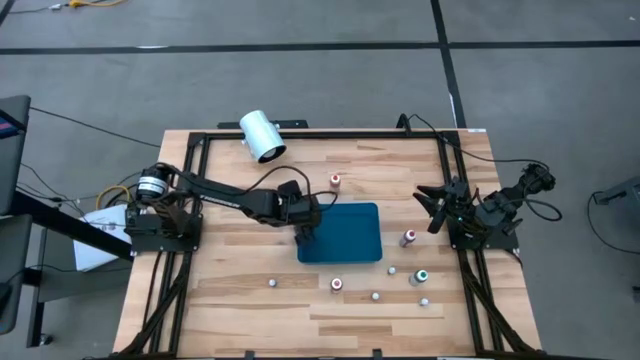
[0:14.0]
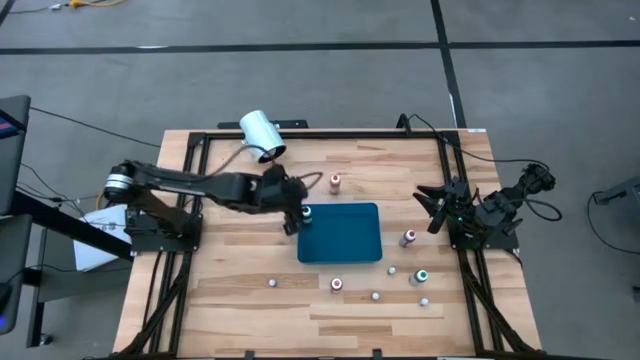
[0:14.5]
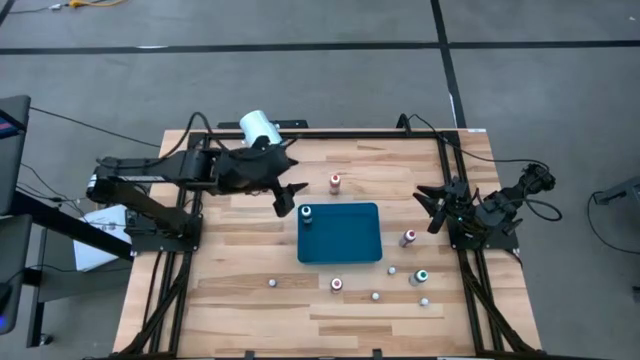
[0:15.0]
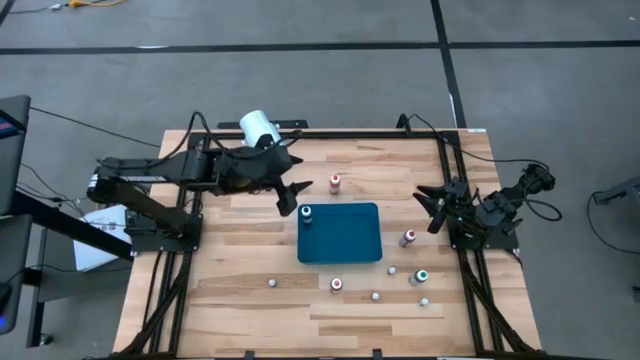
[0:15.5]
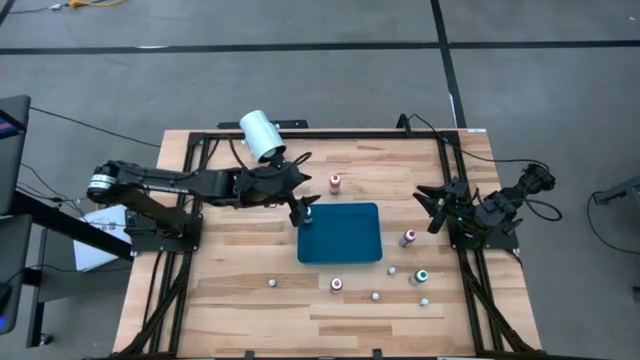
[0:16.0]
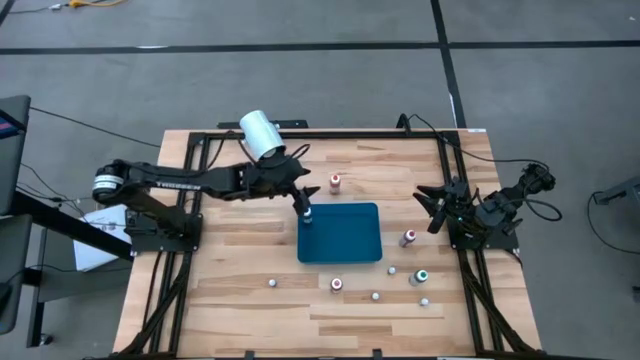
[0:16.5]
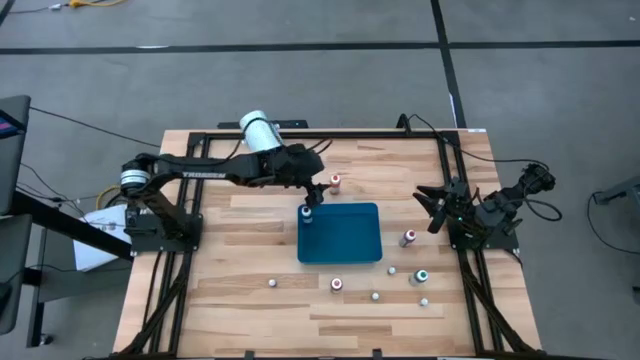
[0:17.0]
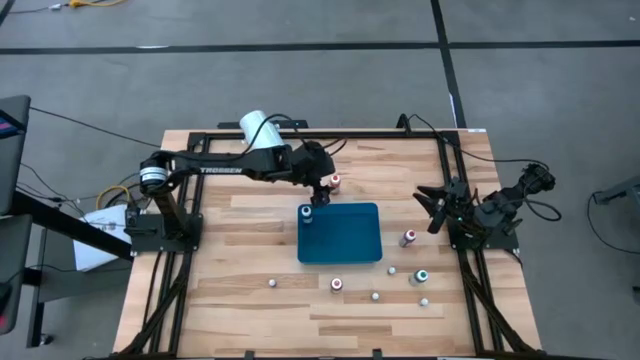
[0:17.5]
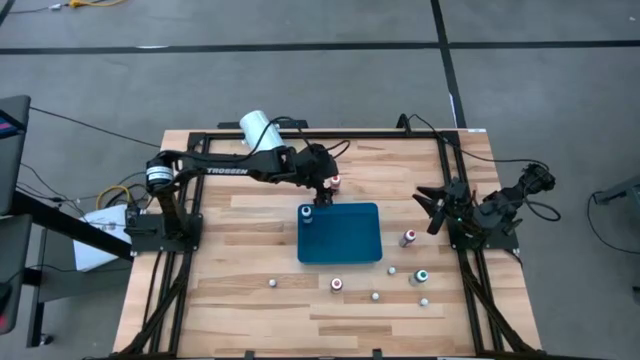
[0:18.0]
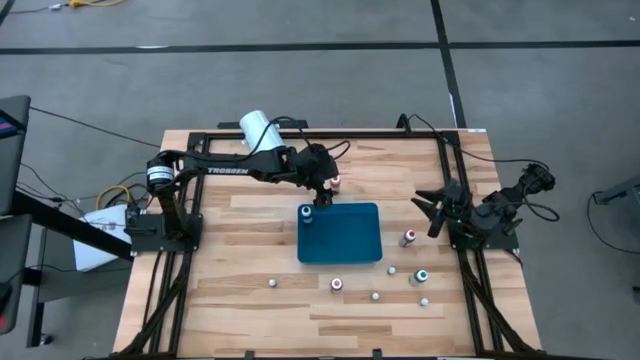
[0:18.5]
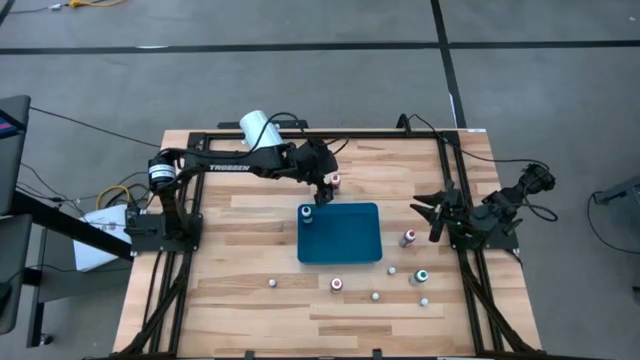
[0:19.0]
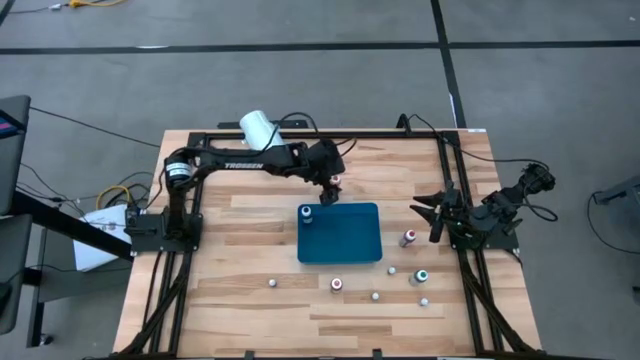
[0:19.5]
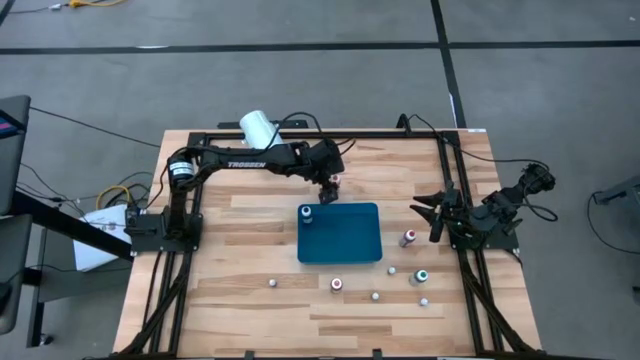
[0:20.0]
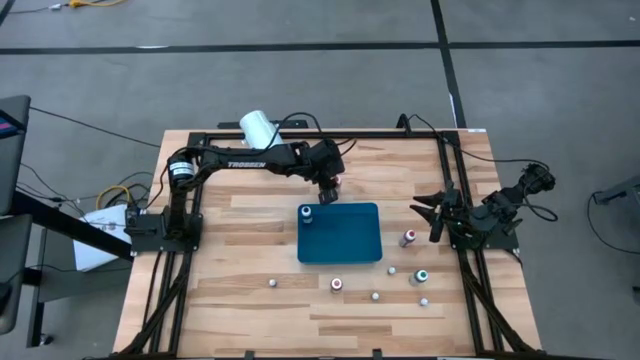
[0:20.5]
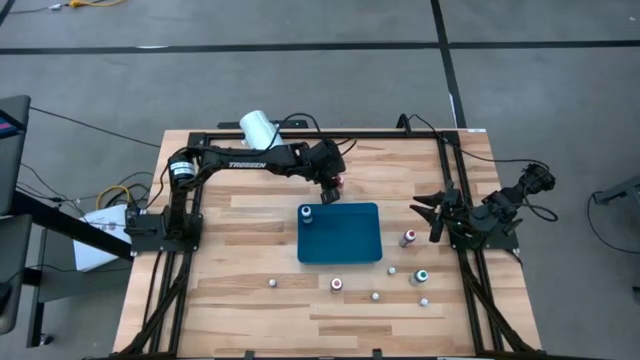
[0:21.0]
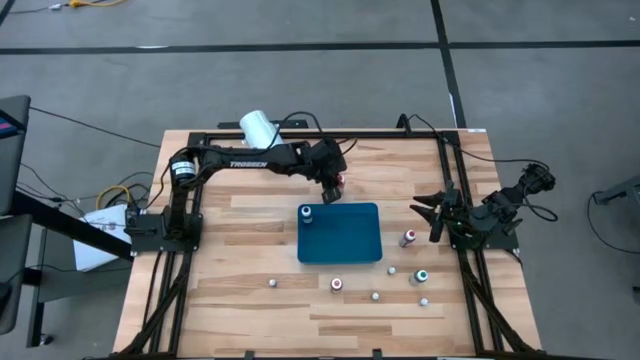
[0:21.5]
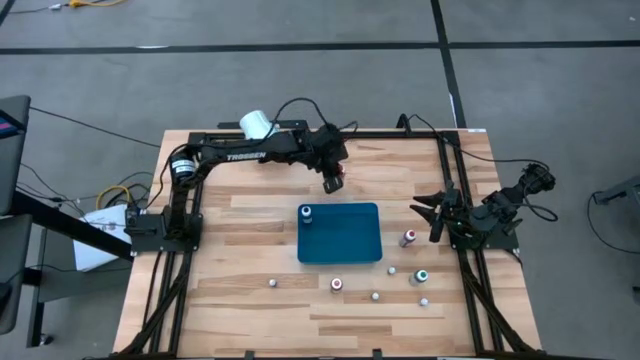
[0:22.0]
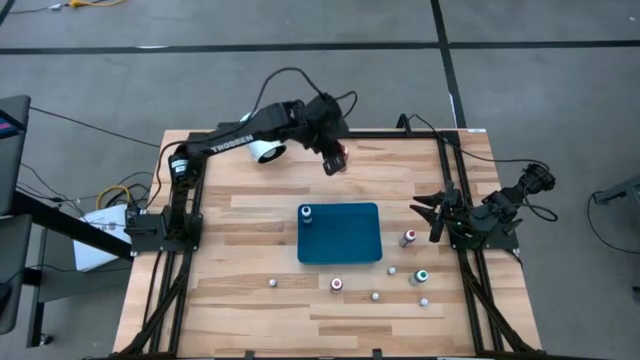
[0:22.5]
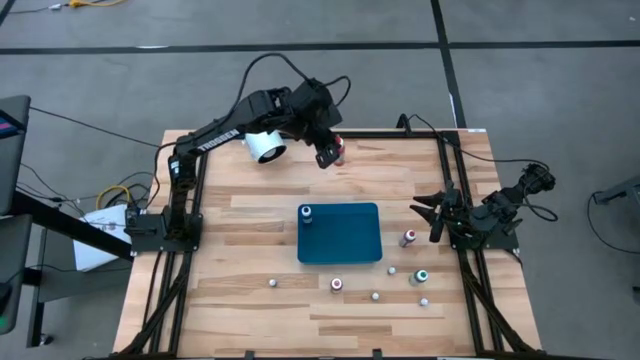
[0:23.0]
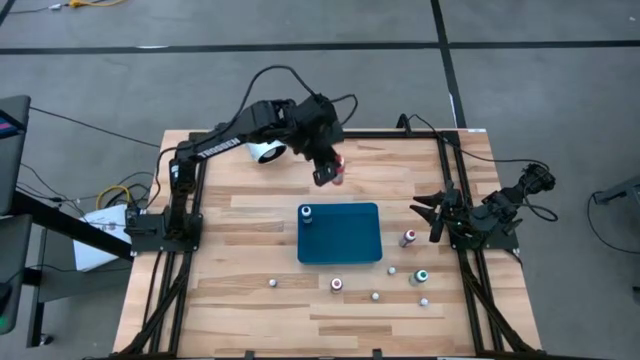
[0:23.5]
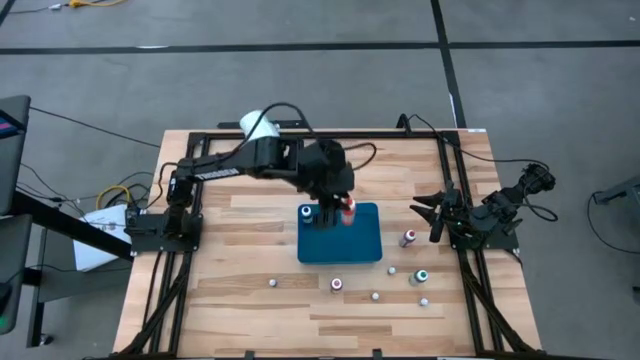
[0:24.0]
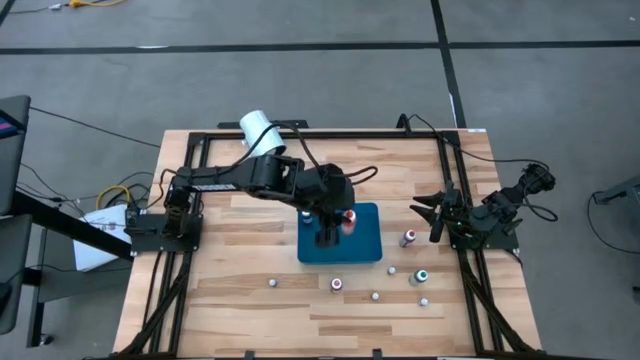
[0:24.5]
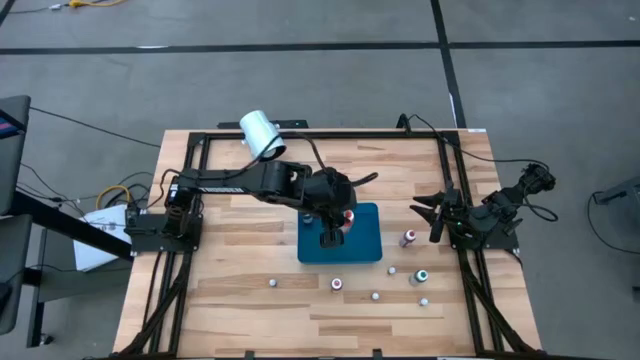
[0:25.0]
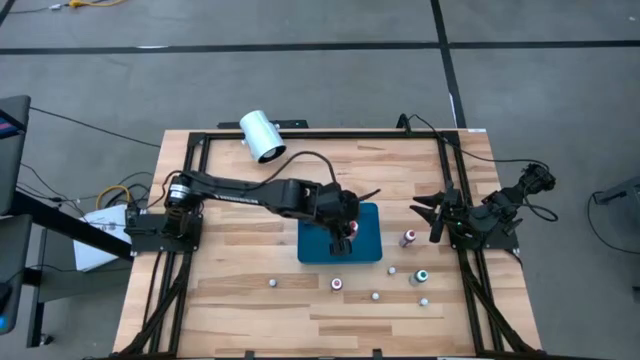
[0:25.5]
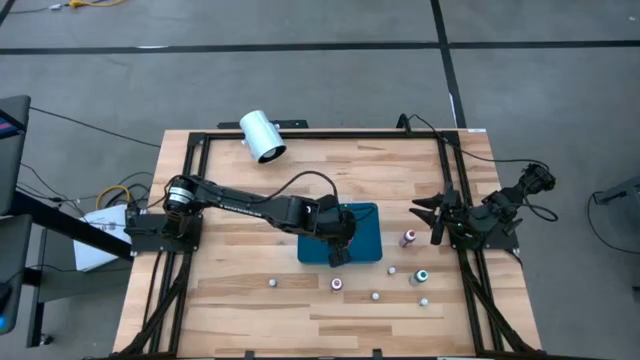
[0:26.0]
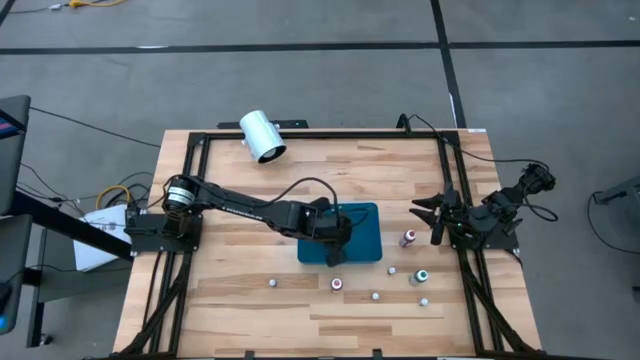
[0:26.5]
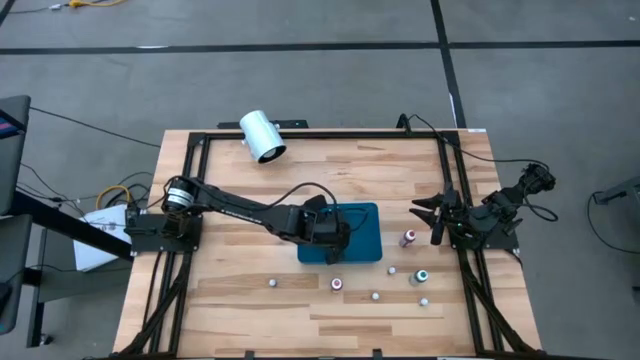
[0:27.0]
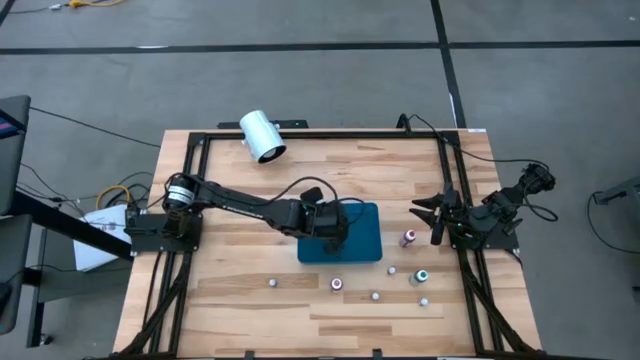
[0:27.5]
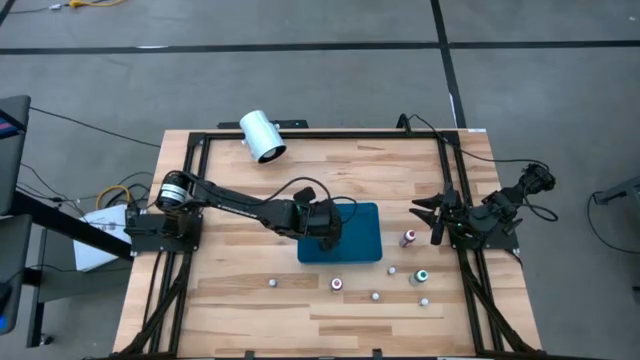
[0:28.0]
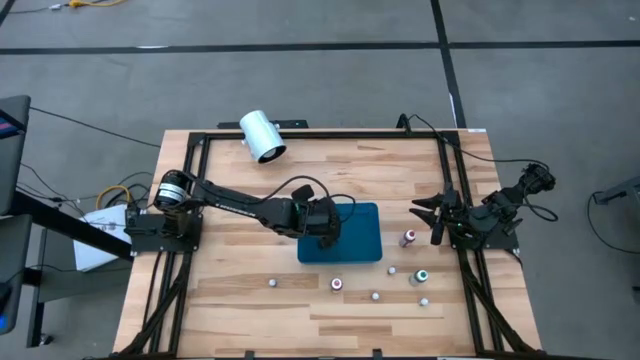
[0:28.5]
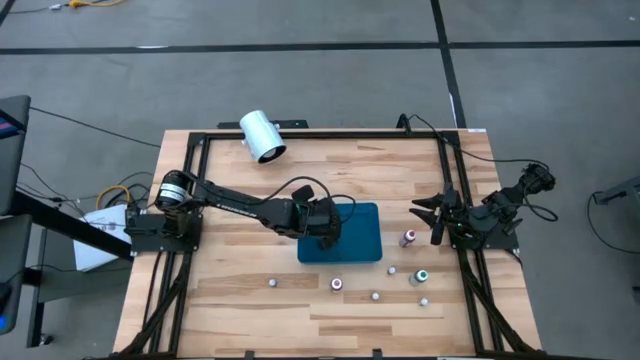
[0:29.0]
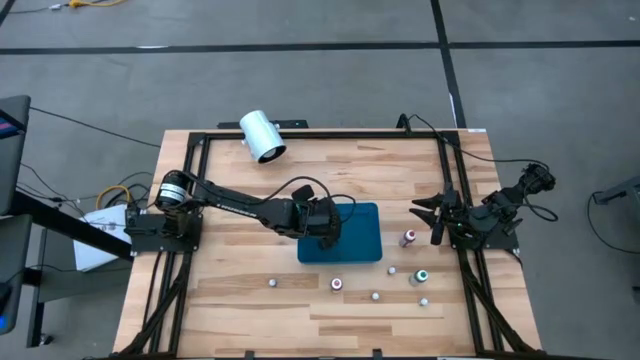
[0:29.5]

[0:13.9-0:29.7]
Task: Pick & Place food coloring
Put the large orange food coloring bottle into the blue bin

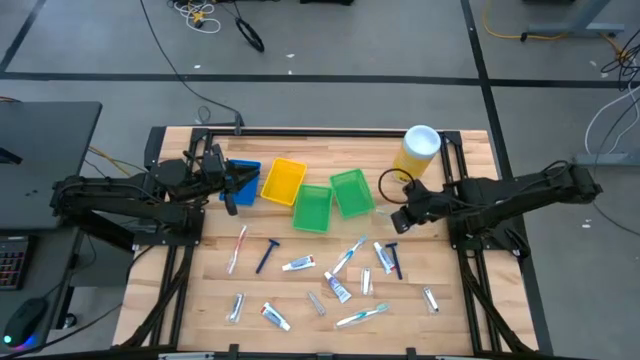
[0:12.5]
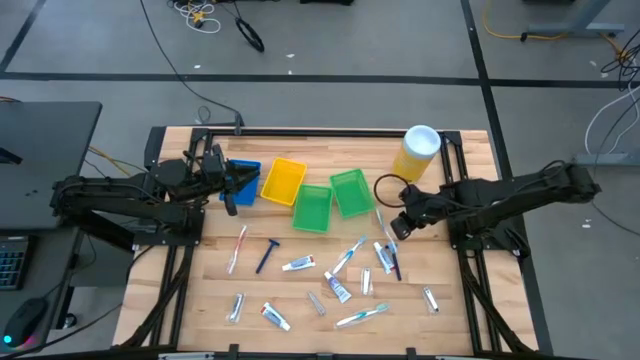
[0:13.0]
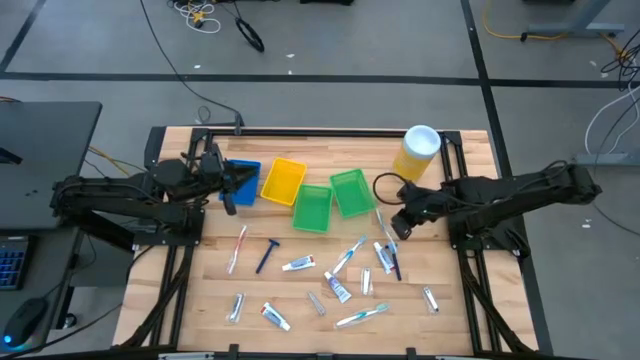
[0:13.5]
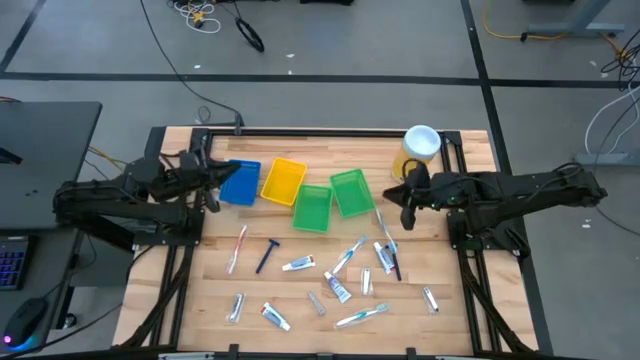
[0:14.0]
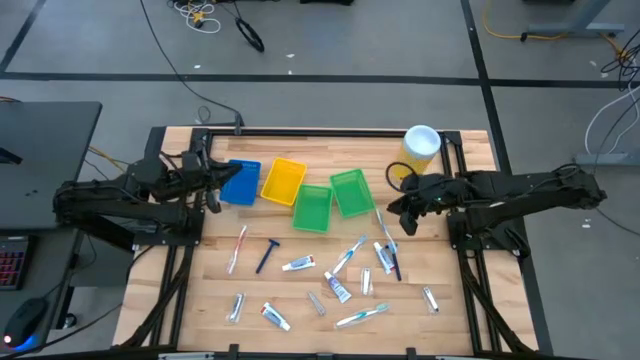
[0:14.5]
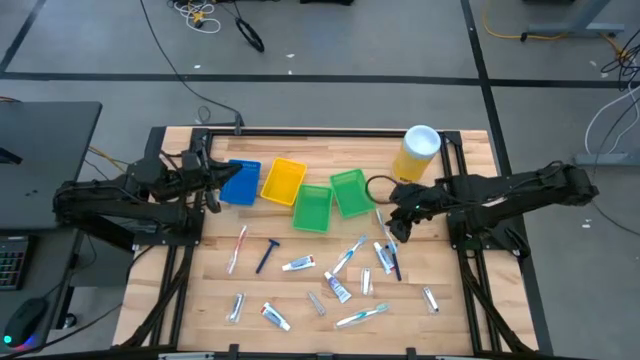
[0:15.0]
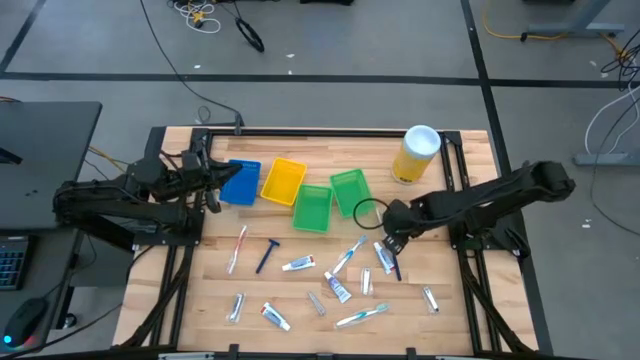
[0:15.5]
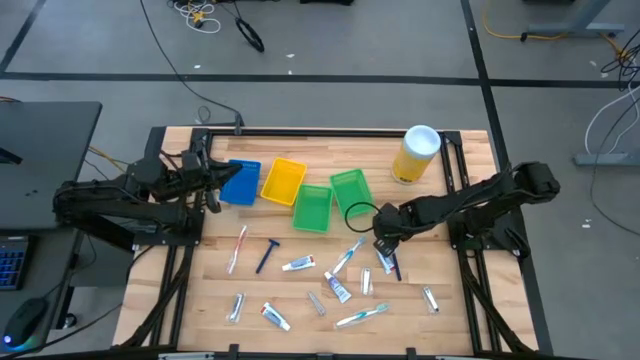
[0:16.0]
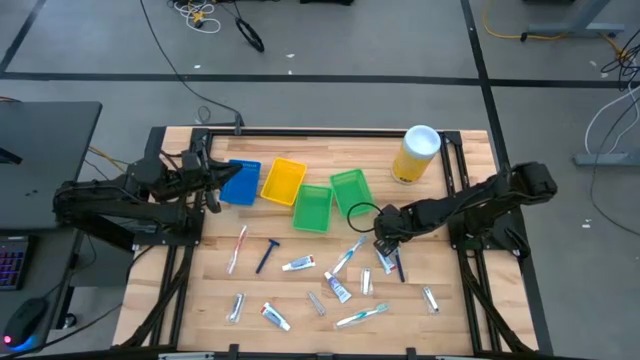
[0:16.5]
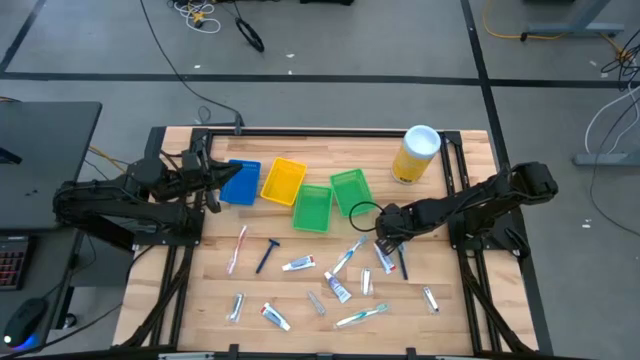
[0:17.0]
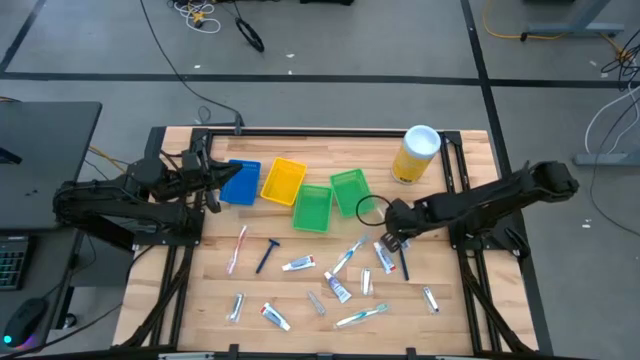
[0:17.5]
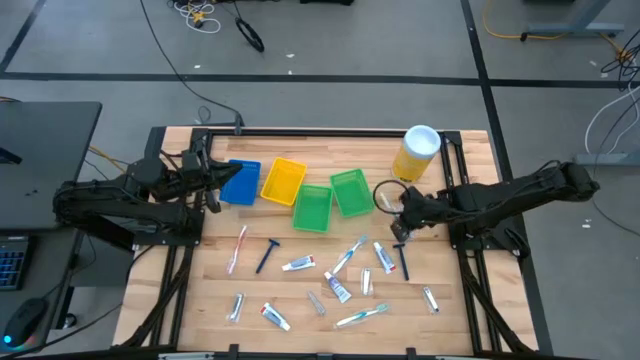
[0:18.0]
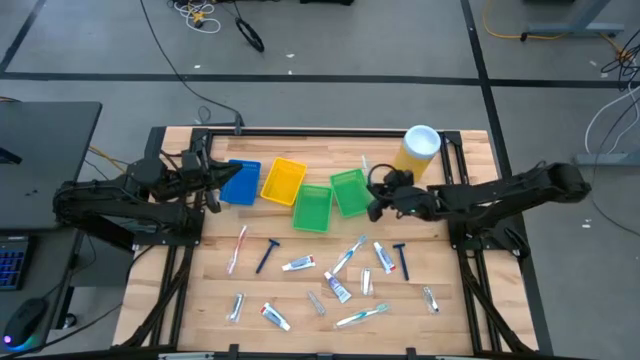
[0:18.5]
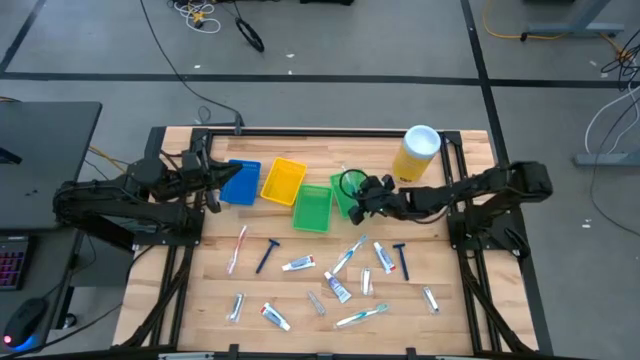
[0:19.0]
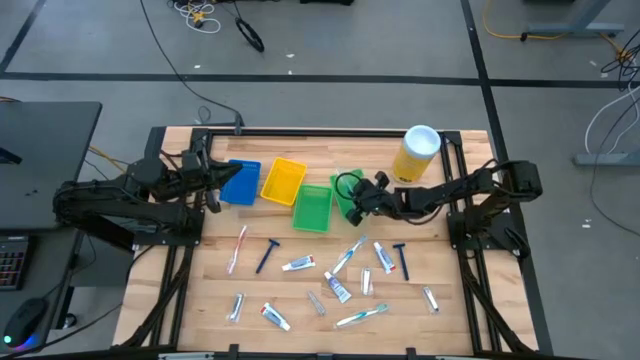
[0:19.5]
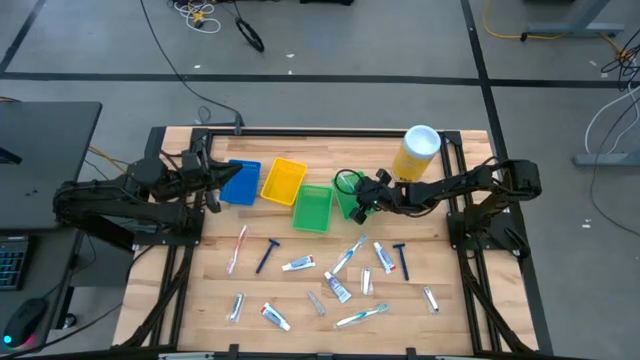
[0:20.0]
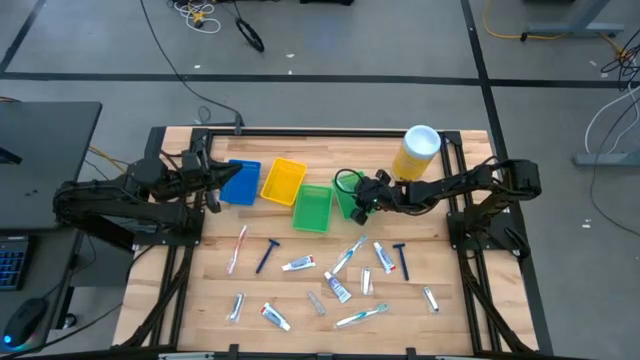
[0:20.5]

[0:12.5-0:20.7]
Task: Pick & Place Travel size toiletries
Put the blue toothbrush into the right green bin
